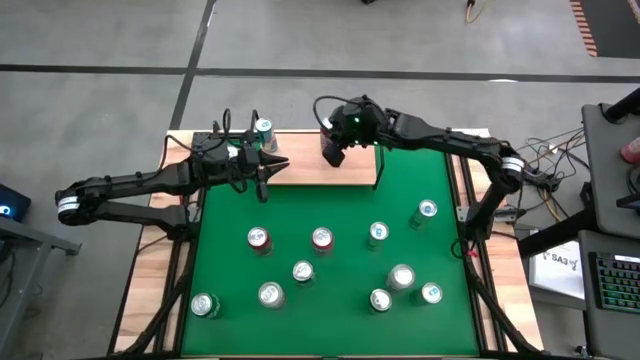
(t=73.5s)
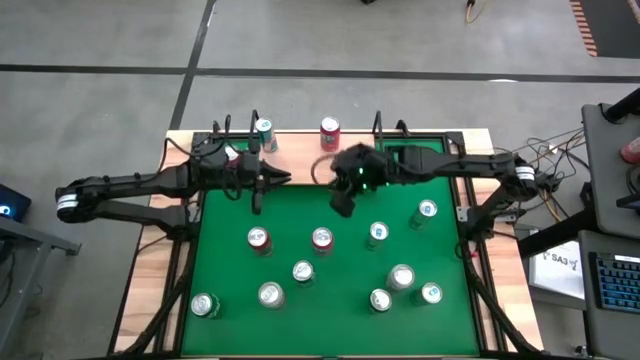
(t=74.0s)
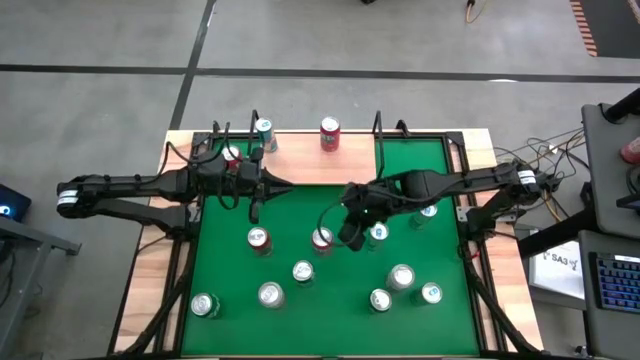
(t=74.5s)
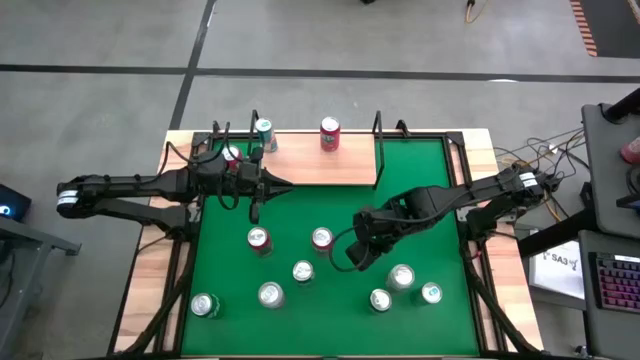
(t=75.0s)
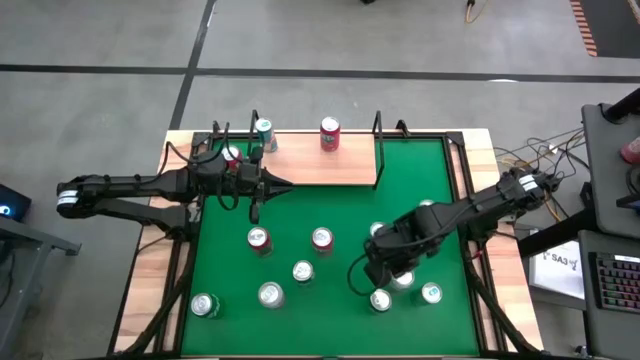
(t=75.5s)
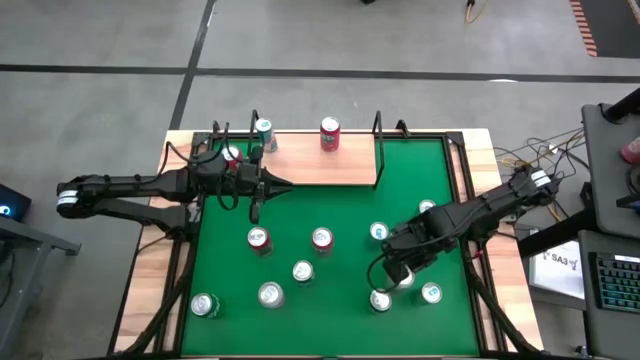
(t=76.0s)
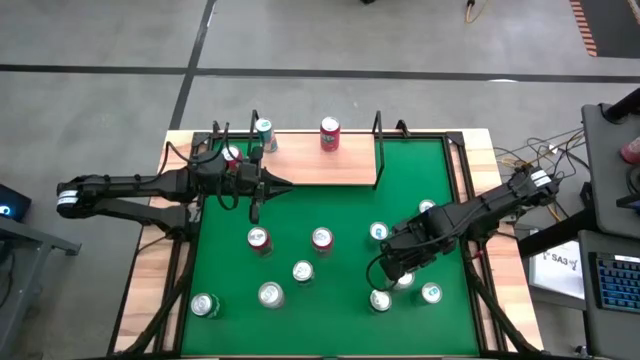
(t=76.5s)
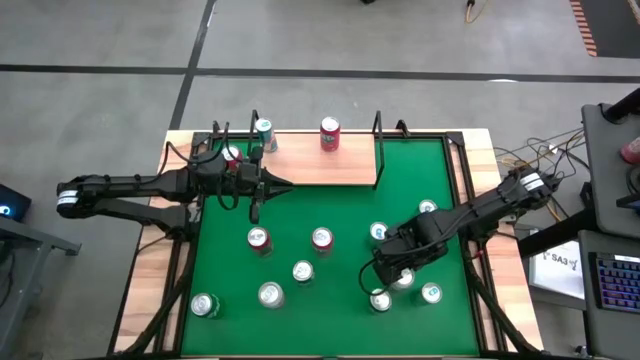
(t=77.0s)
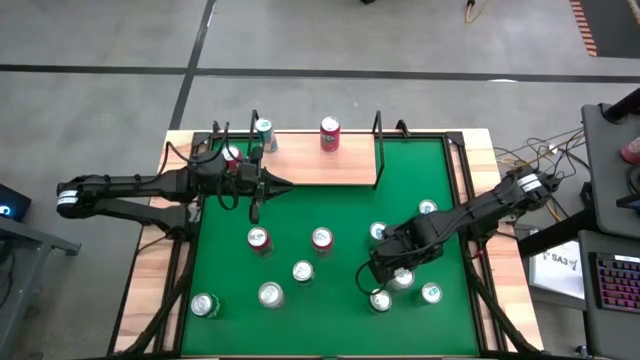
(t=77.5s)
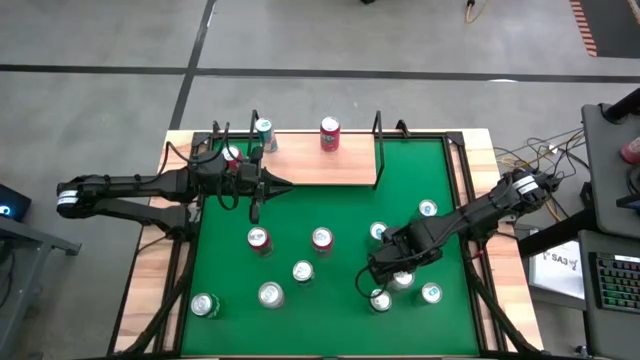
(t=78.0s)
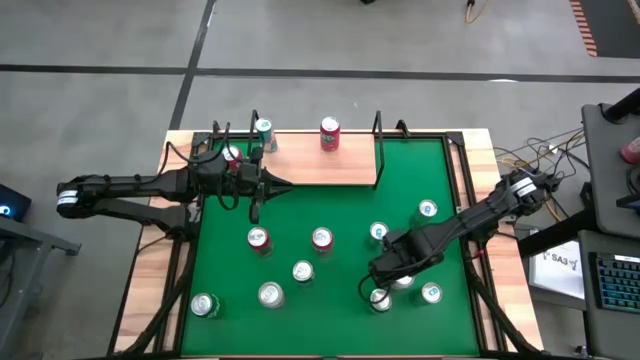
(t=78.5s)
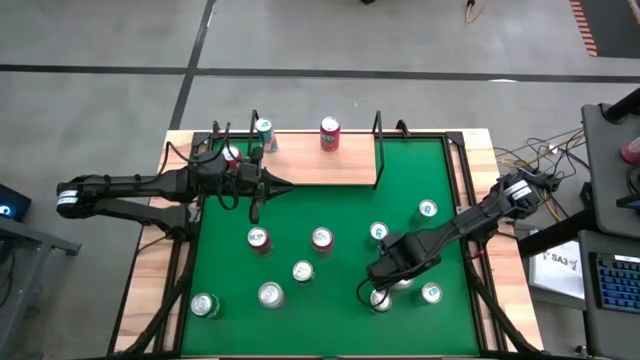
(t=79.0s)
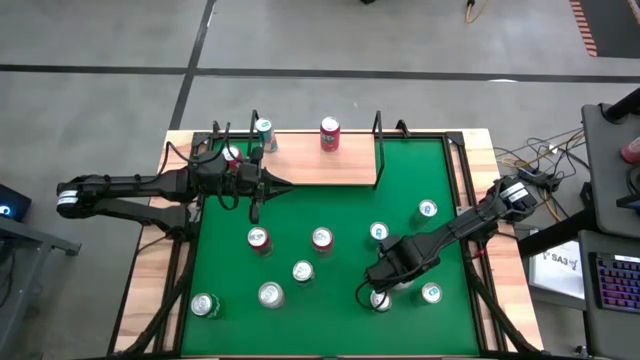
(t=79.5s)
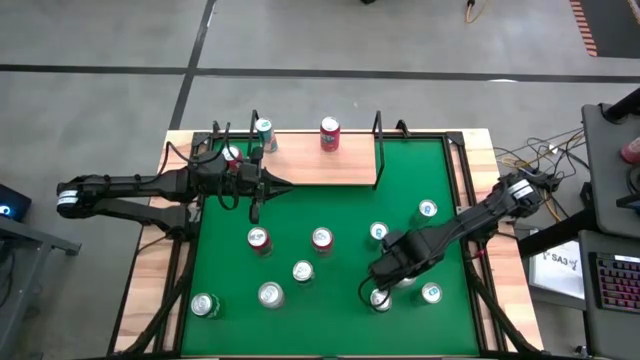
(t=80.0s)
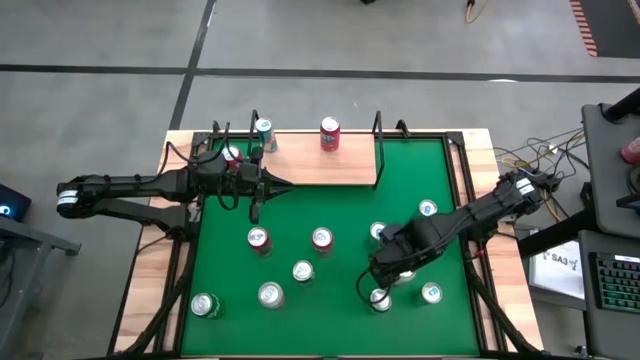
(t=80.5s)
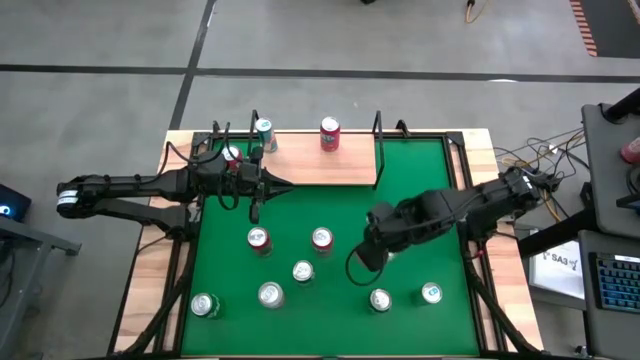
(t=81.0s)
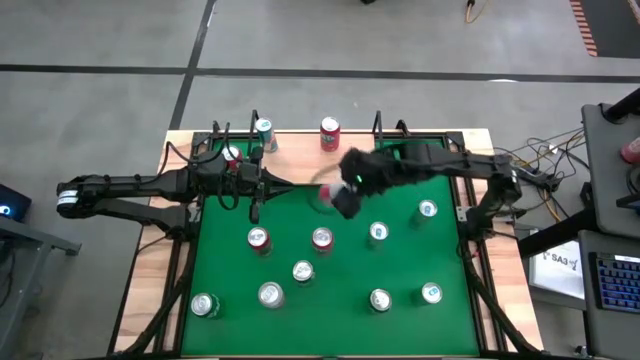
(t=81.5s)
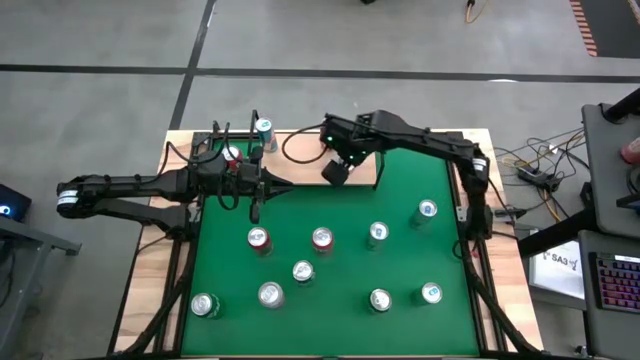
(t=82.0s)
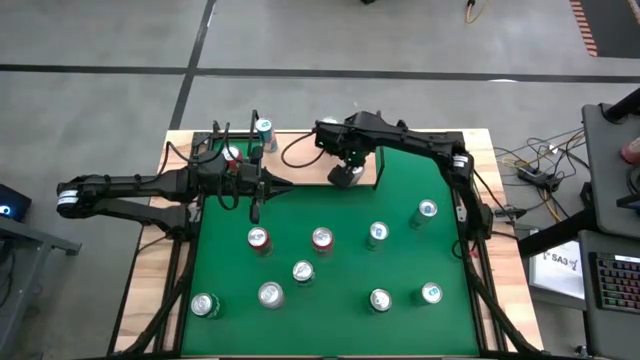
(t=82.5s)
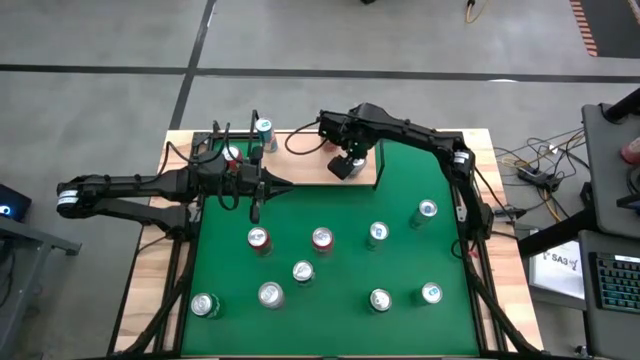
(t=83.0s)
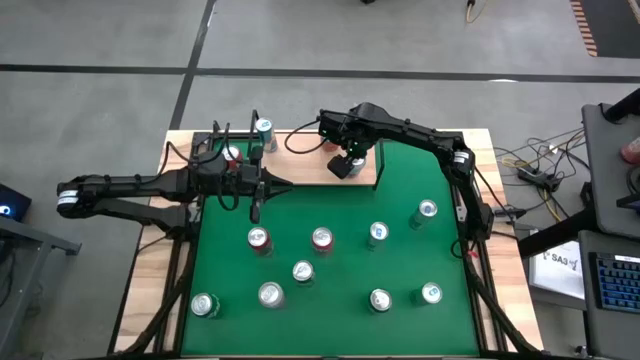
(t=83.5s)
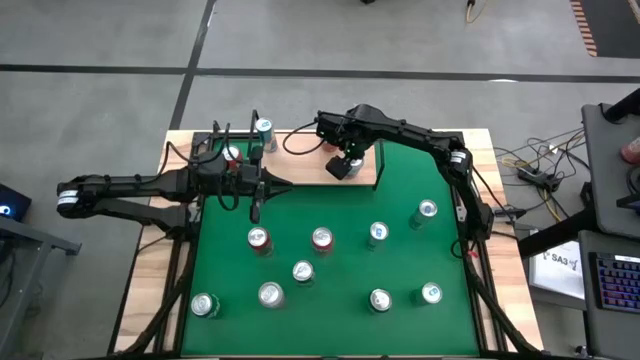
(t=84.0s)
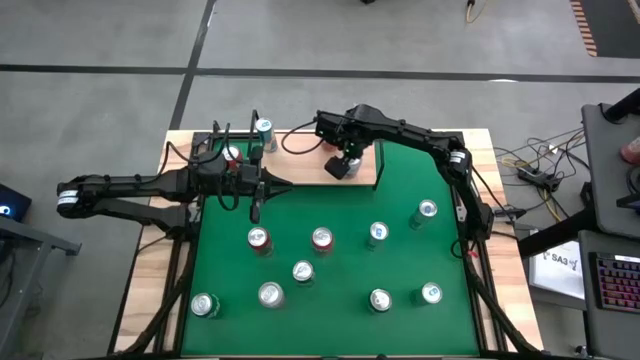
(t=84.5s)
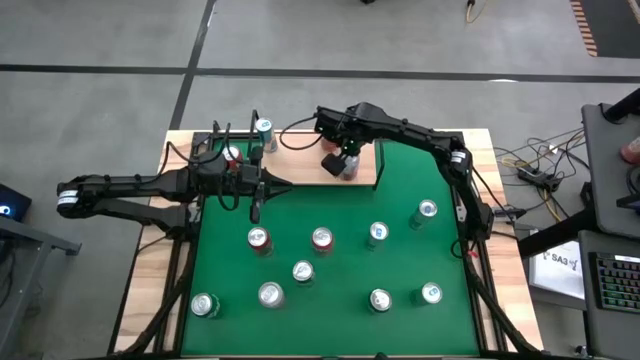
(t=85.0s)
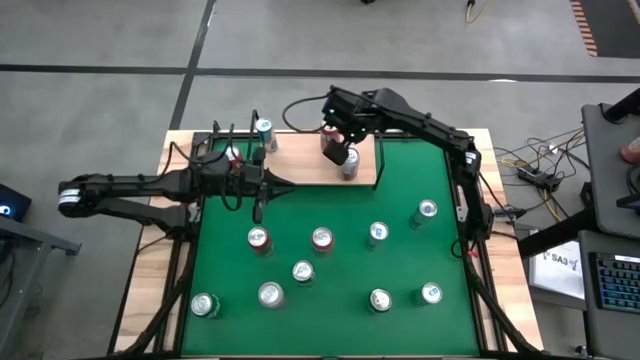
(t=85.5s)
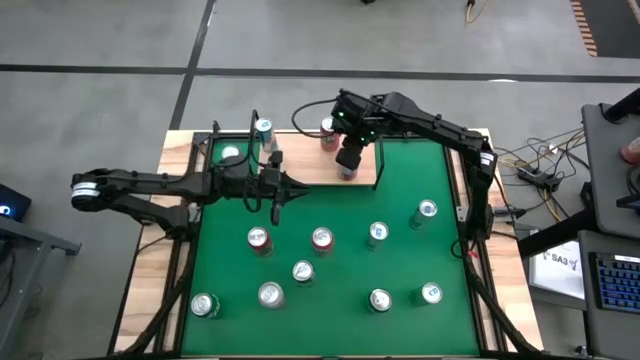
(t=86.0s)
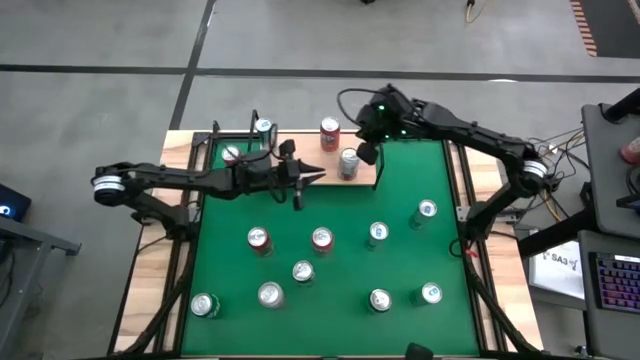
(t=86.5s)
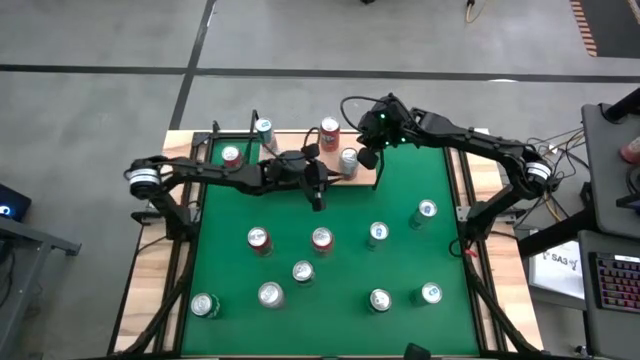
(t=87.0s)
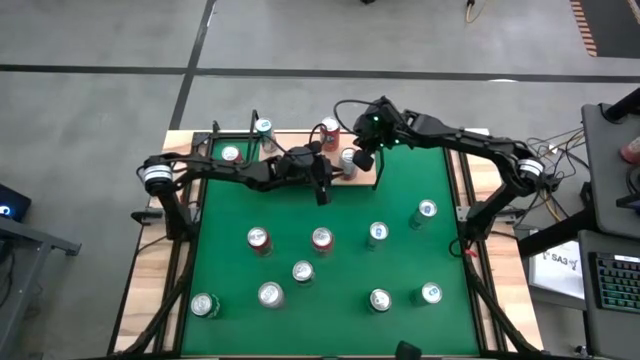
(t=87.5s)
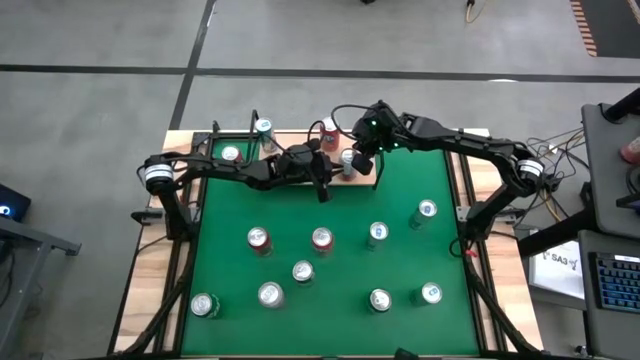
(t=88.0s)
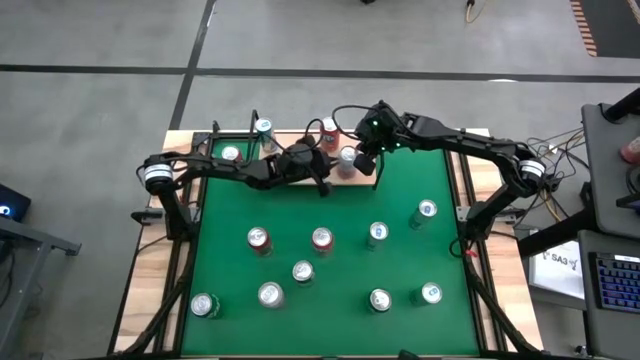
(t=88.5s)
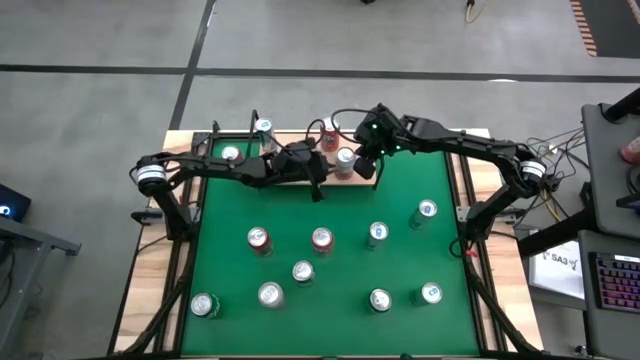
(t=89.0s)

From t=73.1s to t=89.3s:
Task: Pick and place cans onto a shelf
Put the right pink white soda can on the shelf

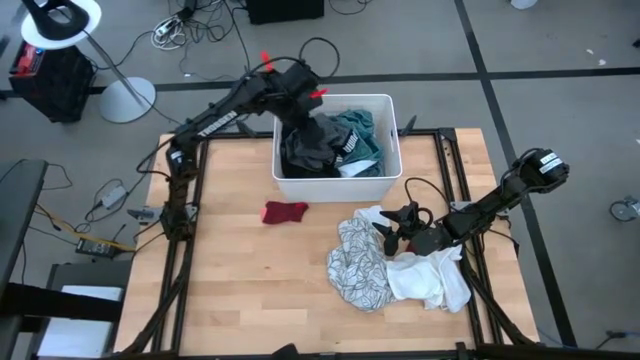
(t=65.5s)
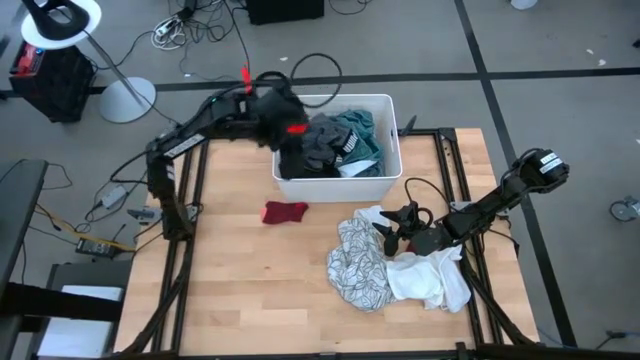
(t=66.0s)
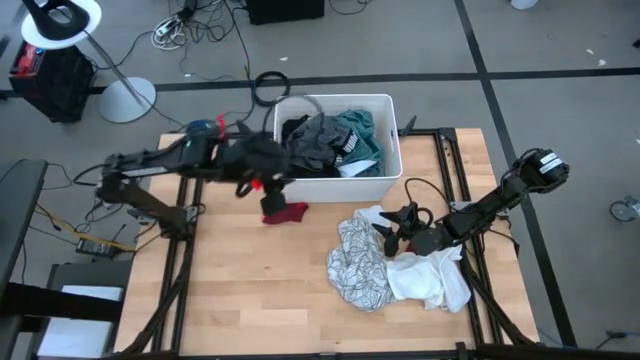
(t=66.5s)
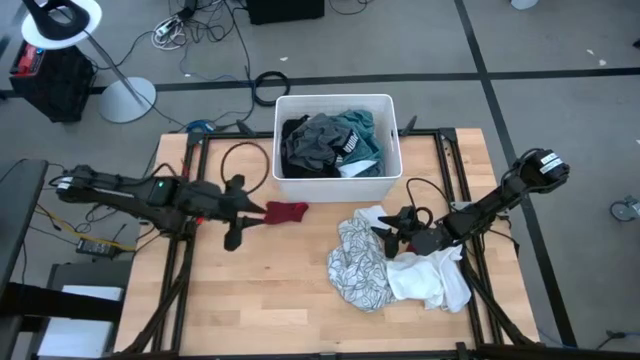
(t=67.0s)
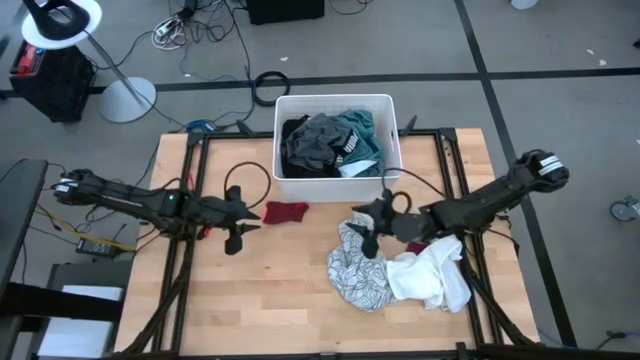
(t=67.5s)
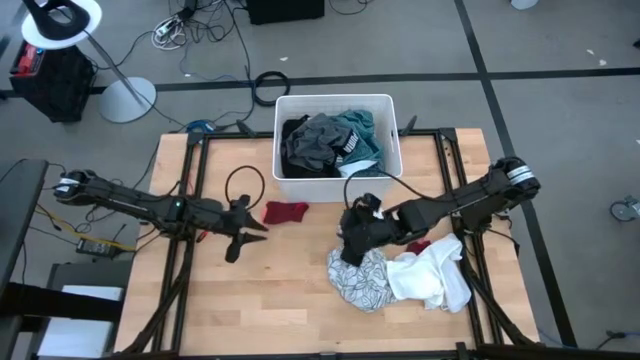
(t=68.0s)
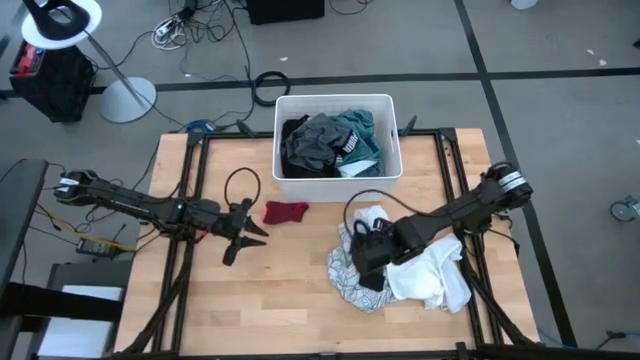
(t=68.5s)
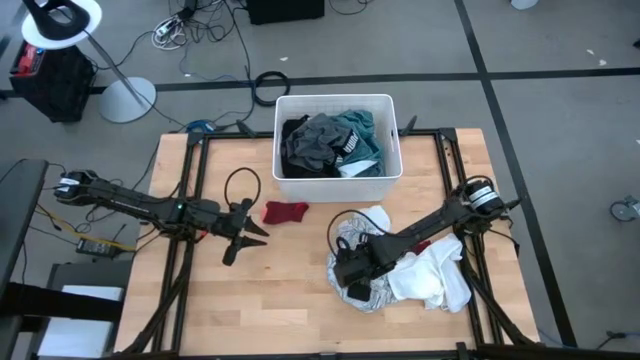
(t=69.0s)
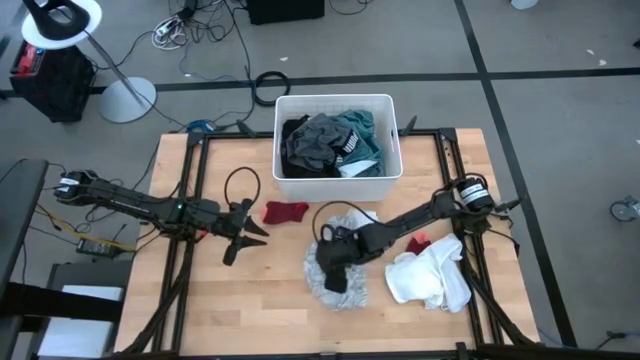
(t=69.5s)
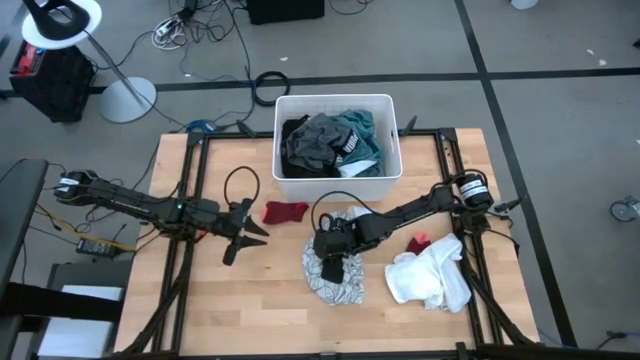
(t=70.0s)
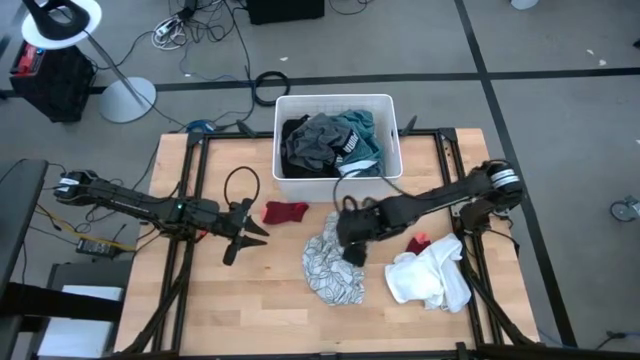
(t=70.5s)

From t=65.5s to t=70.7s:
Task: Sort clothes
Move the white floral shirt to the center
